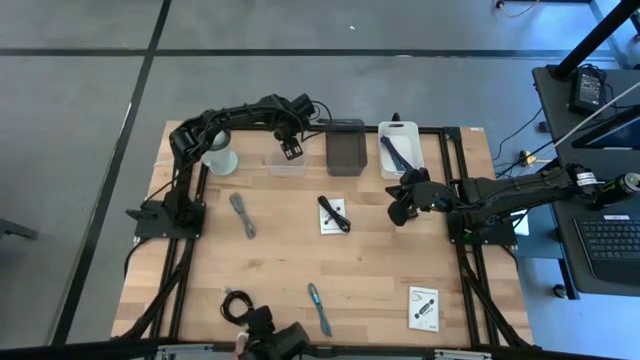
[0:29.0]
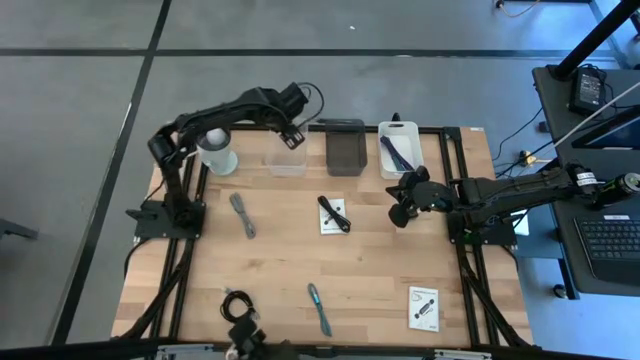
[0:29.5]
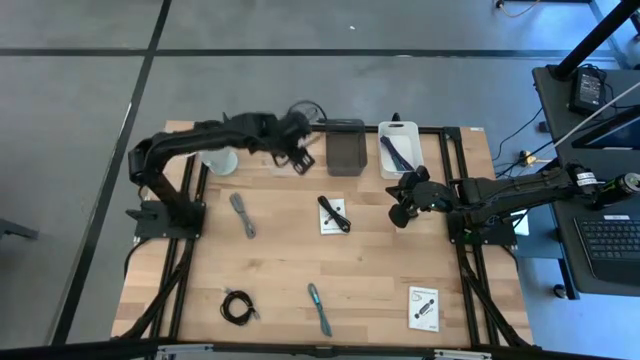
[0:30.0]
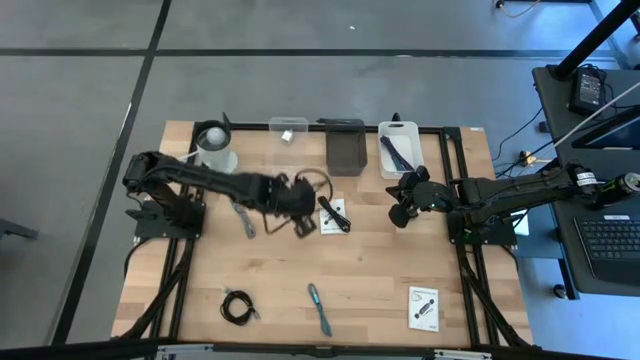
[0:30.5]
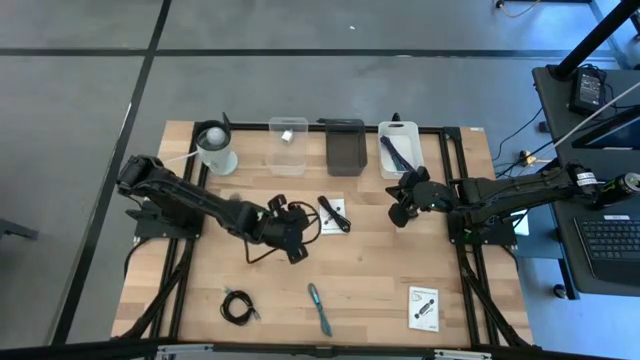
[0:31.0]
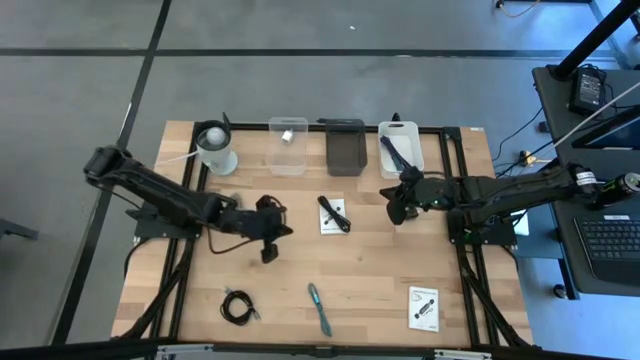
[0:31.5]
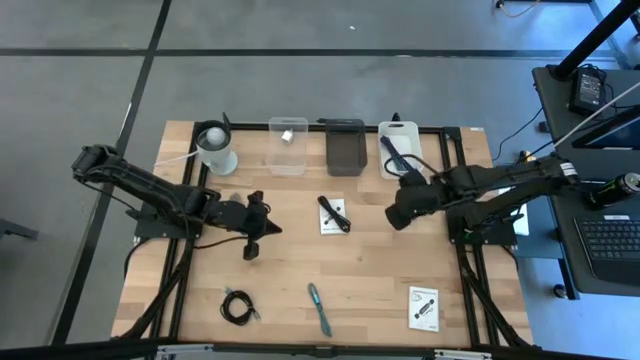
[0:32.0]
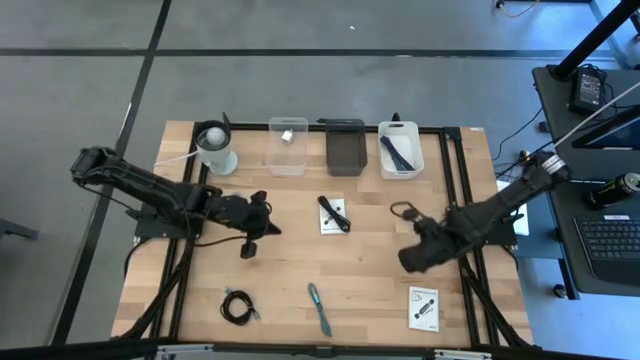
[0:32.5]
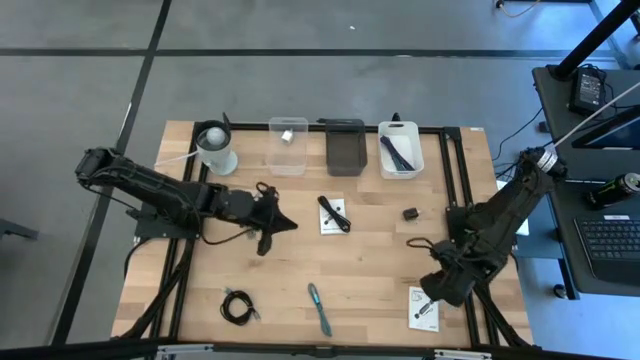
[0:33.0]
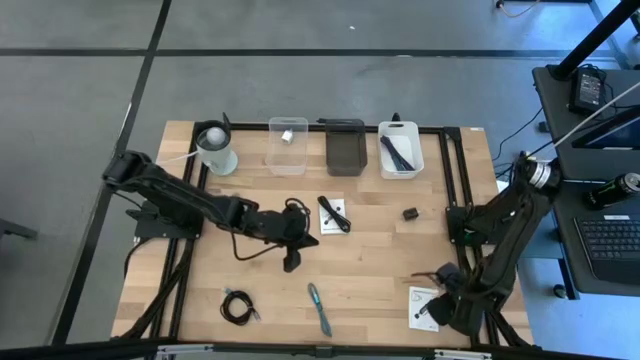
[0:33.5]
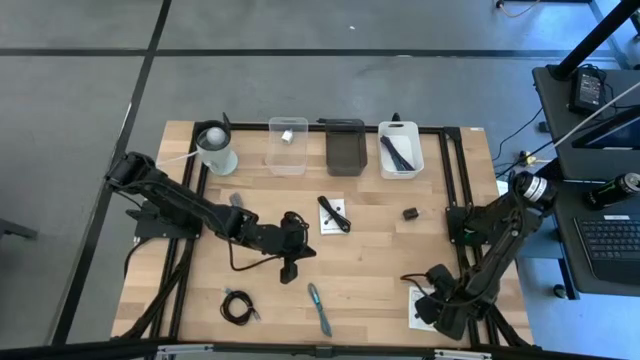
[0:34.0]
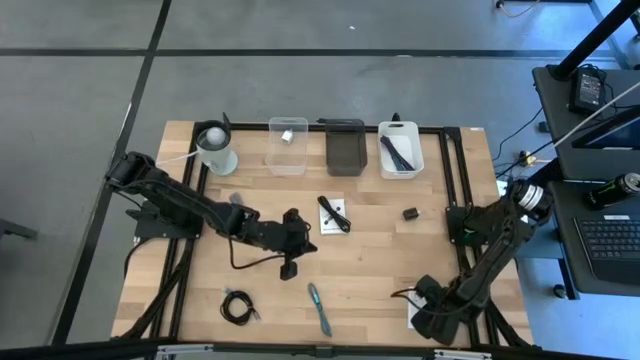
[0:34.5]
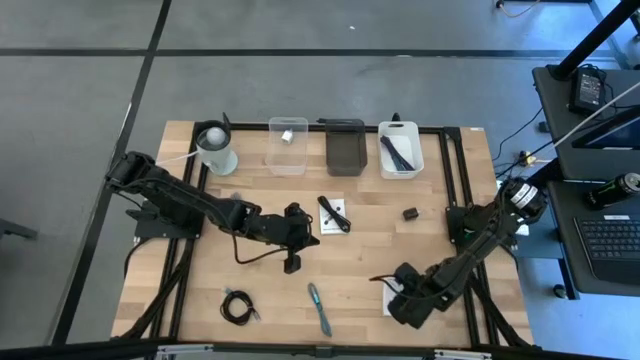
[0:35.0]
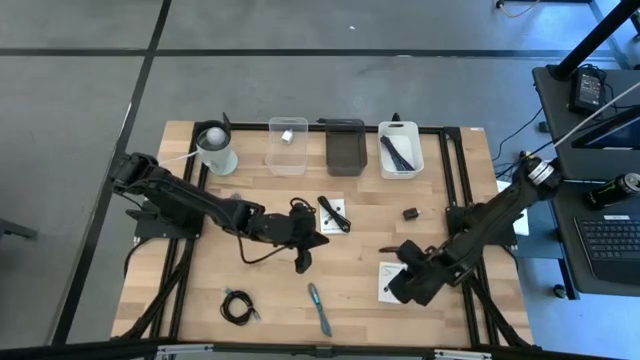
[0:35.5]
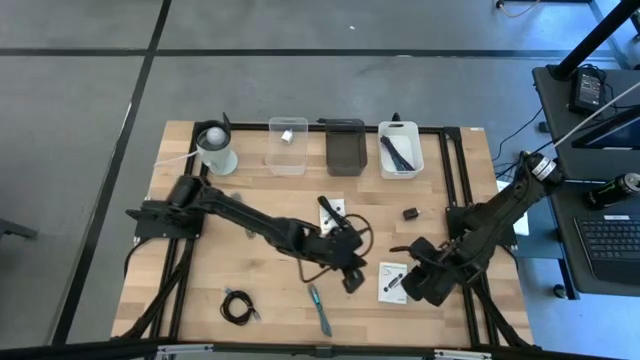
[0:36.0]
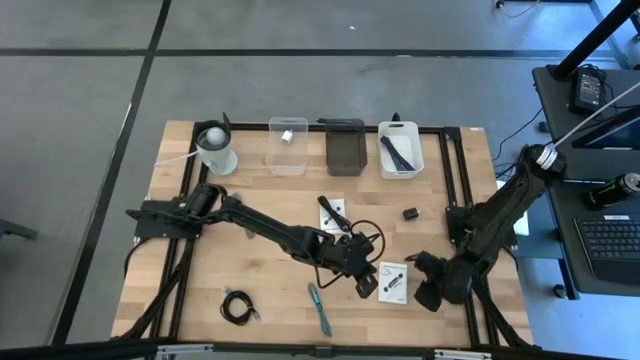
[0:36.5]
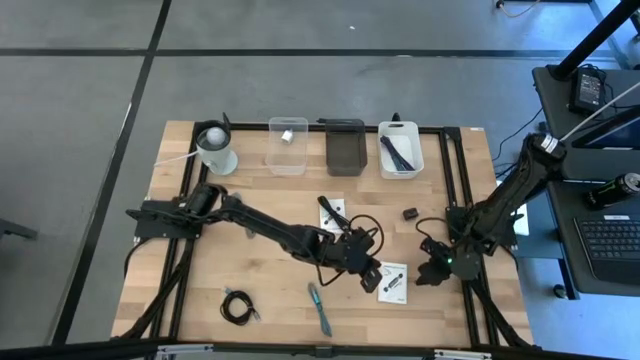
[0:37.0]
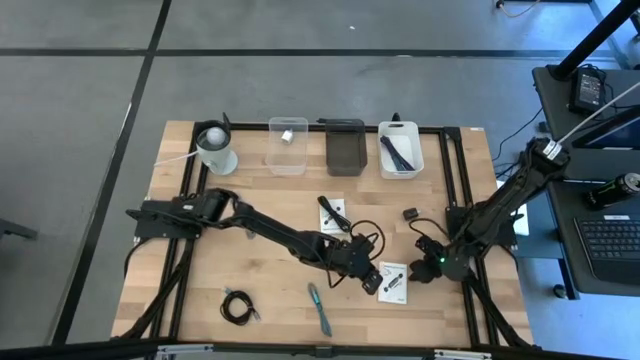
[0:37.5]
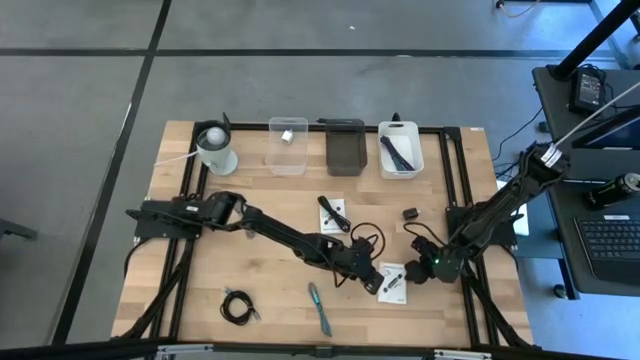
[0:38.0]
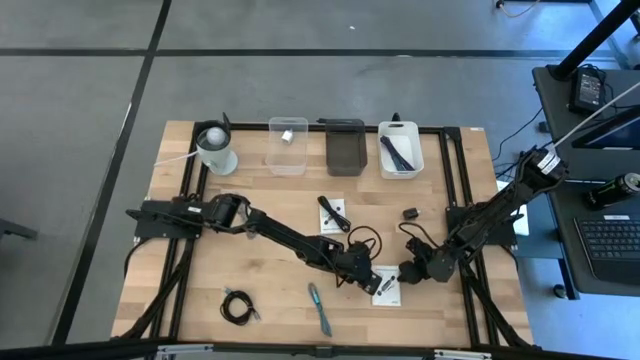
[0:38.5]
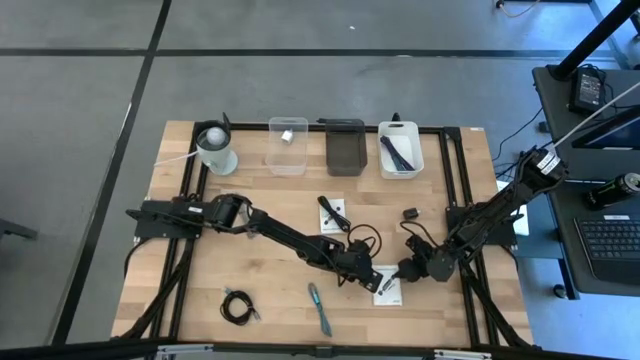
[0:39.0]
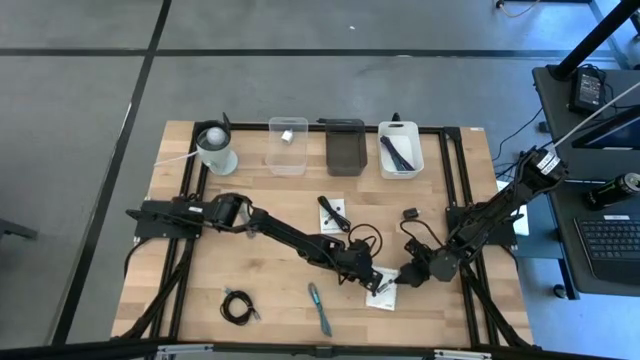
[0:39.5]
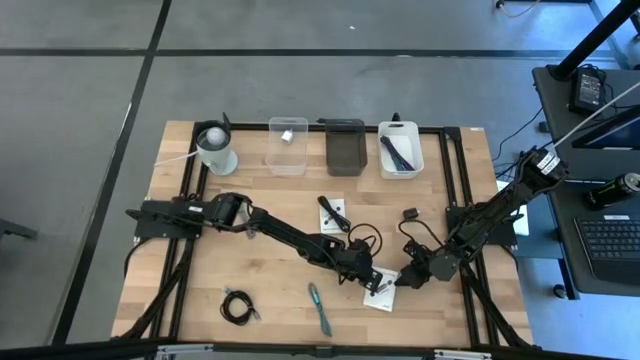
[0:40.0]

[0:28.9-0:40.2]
Task: Pick and place items into bin
Put the bottom white card reader box into the black bin

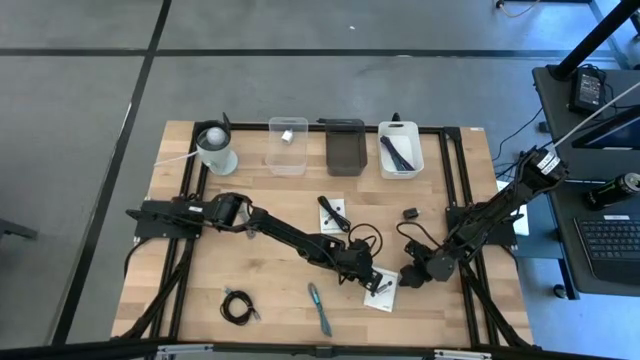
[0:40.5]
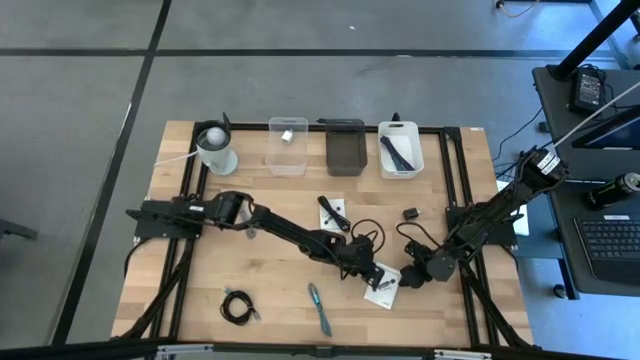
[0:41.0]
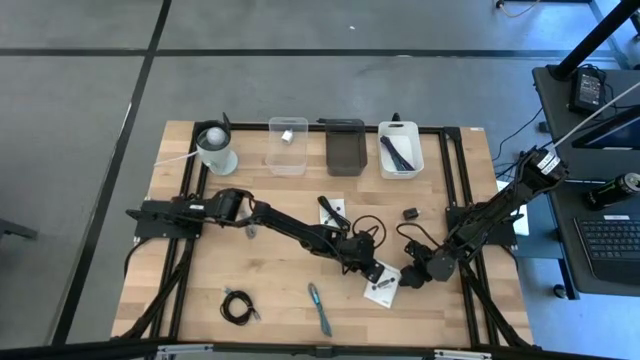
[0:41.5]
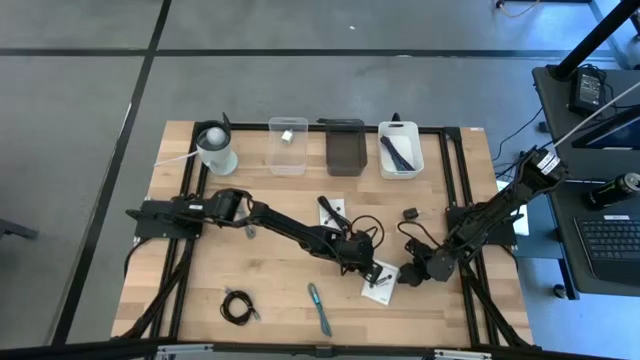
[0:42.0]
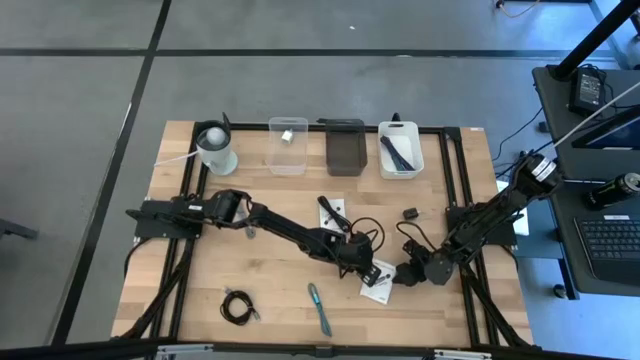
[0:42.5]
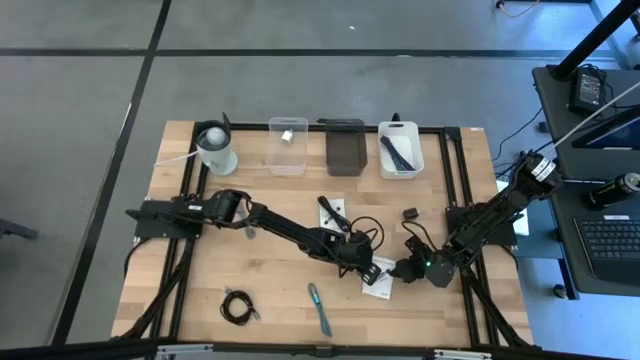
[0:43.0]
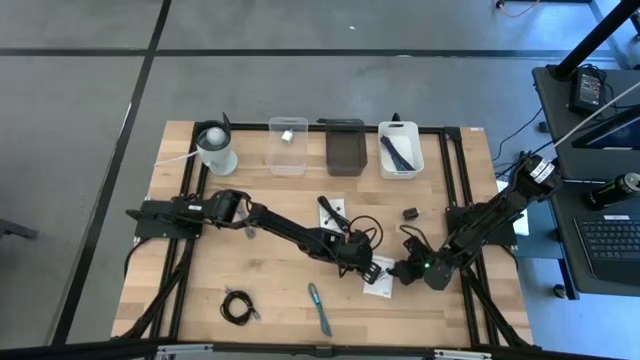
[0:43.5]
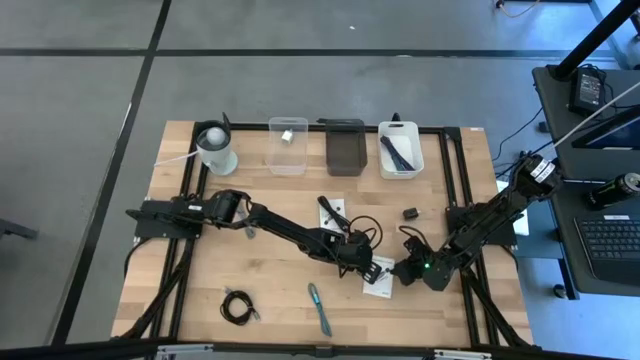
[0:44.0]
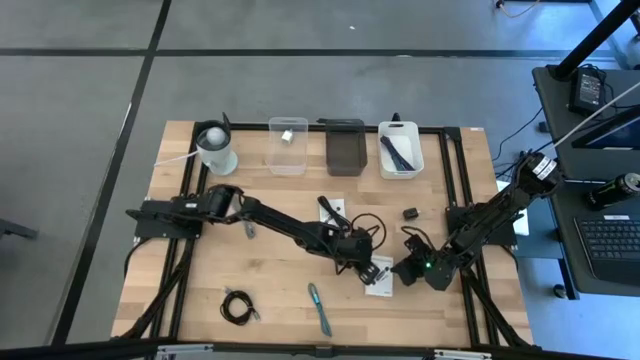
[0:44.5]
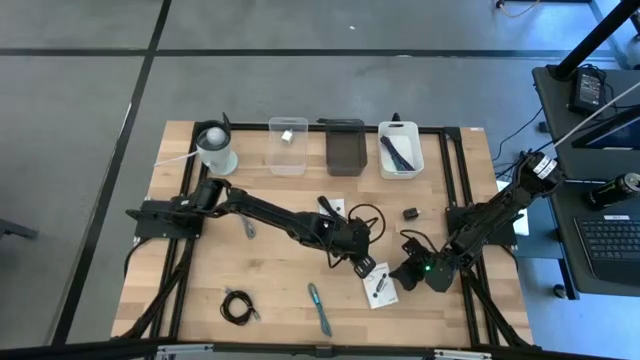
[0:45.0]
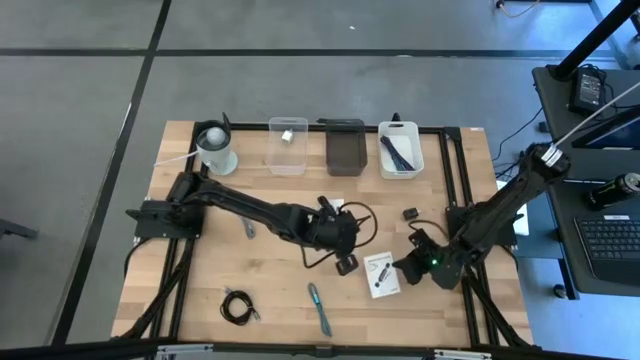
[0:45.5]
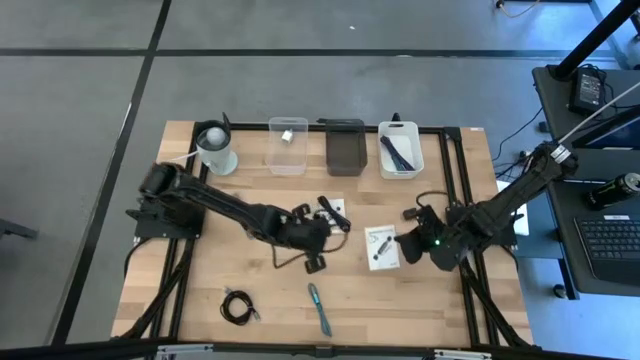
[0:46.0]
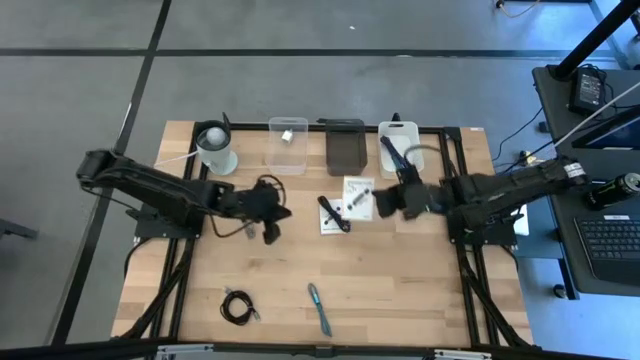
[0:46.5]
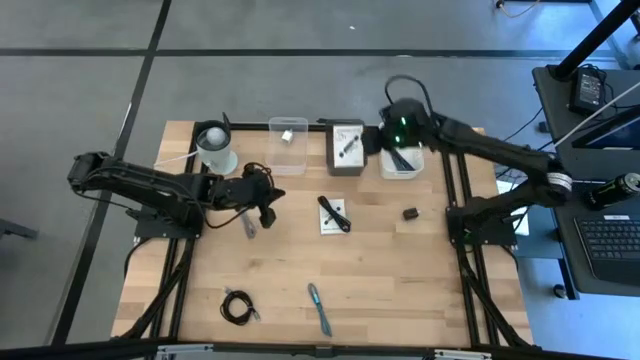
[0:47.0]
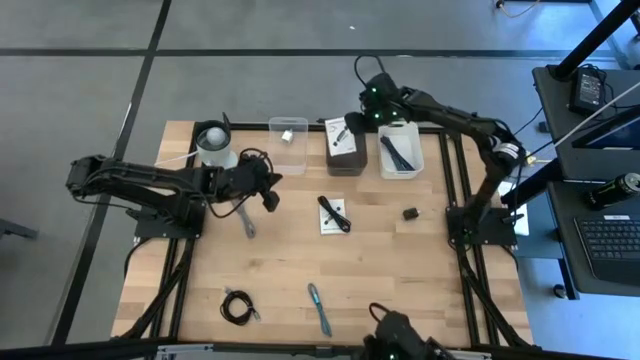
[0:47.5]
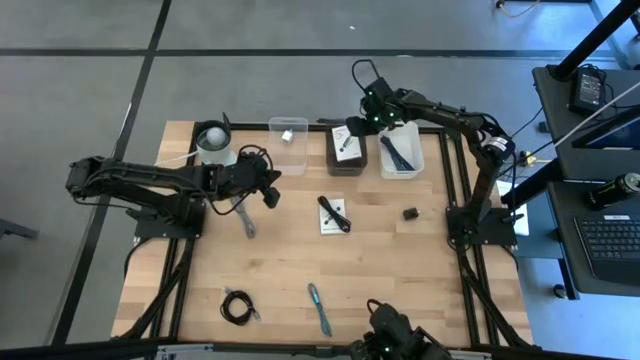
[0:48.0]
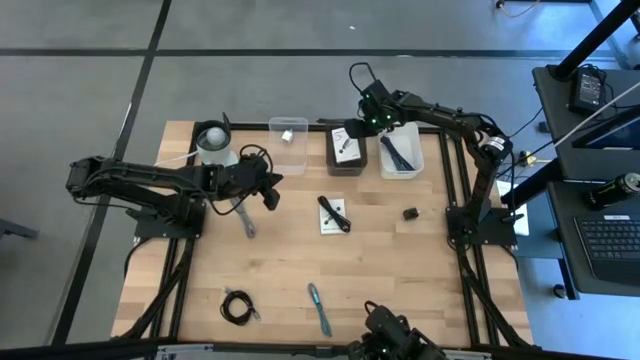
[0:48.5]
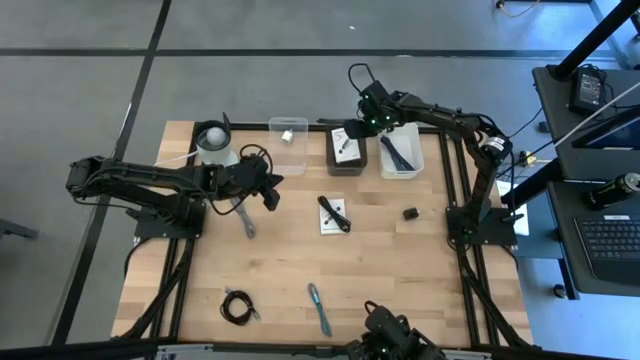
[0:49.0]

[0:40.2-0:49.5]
Put the bottom white card reader box into the black bin

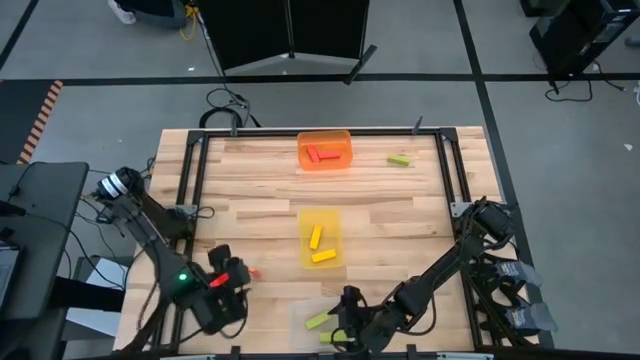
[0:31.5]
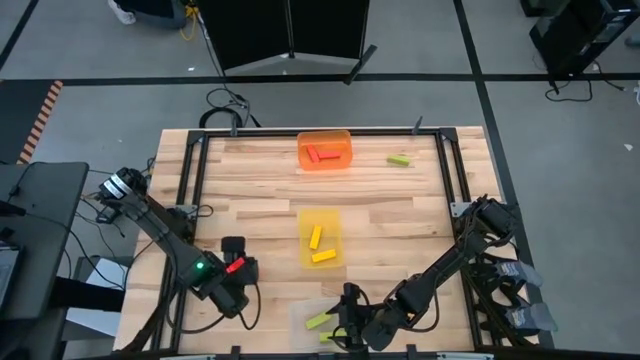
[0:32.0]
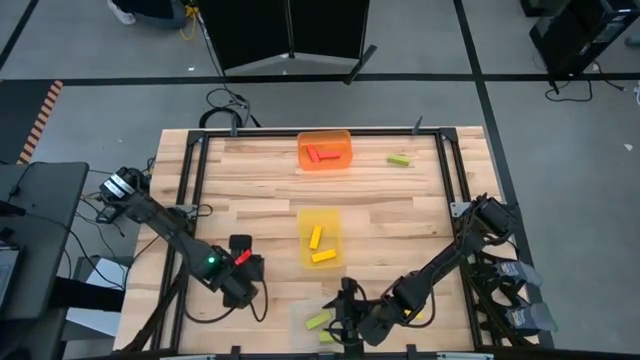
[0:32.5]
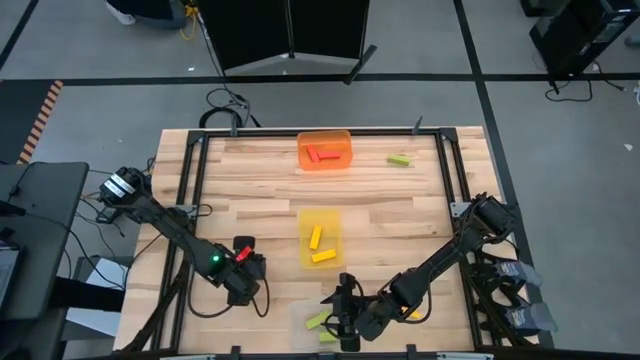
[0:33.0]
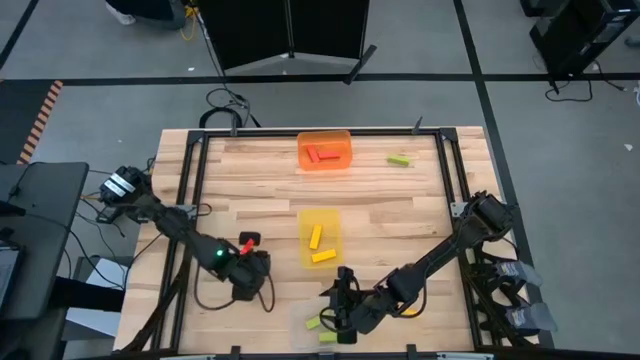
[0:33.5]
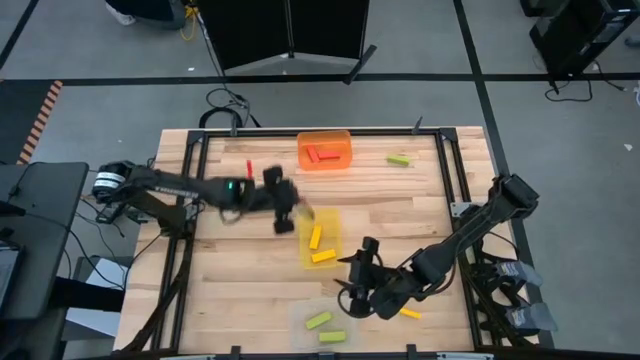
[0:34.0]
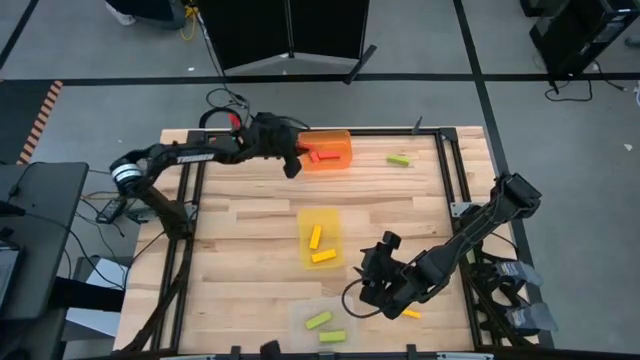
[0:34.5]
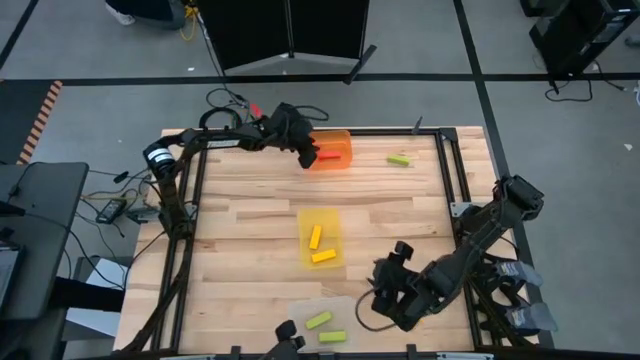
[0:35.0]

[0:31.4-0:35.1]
Task: Sort blocks
Put the orange block into the orange bin
